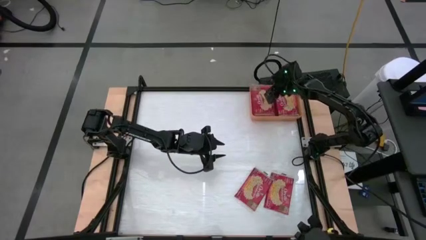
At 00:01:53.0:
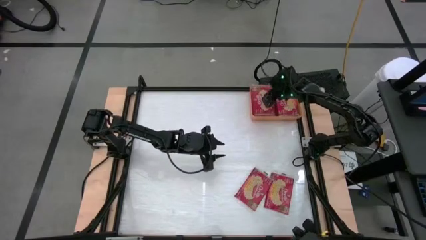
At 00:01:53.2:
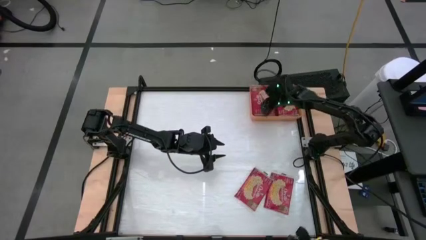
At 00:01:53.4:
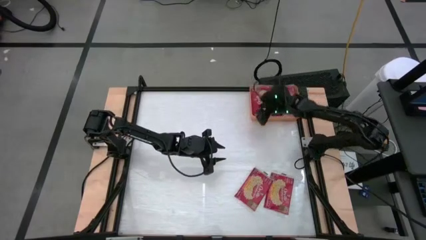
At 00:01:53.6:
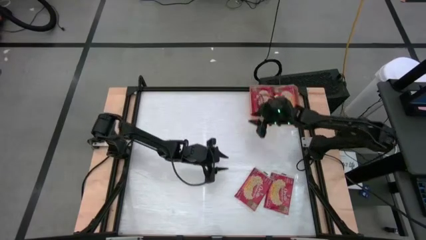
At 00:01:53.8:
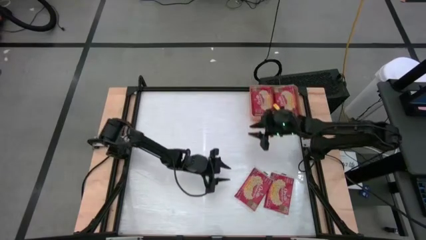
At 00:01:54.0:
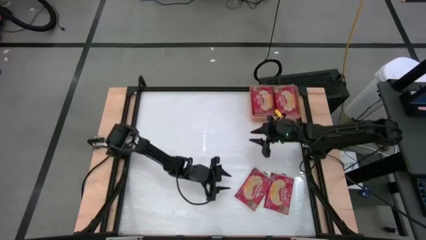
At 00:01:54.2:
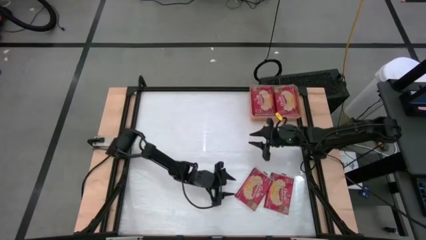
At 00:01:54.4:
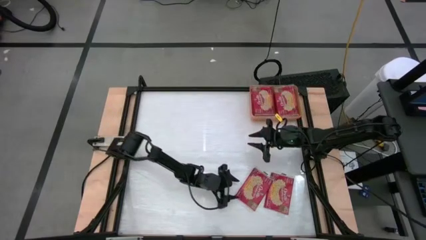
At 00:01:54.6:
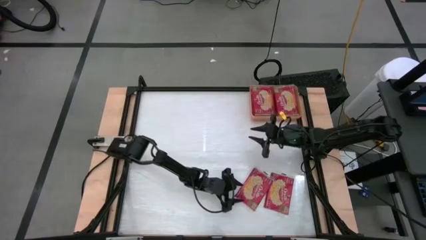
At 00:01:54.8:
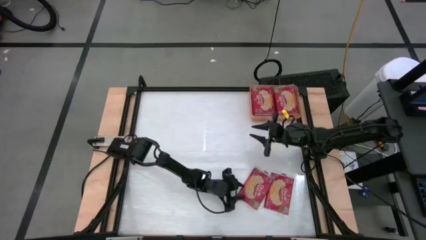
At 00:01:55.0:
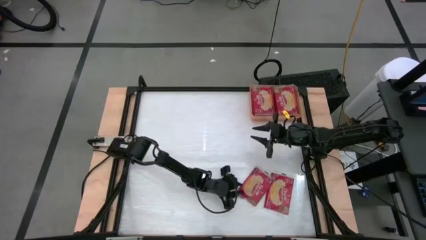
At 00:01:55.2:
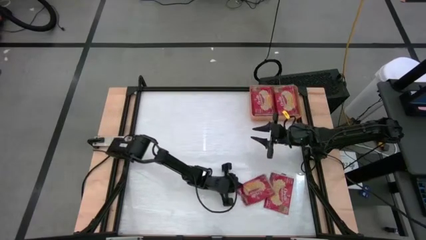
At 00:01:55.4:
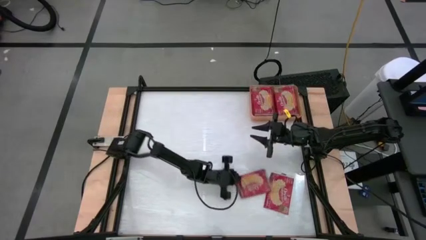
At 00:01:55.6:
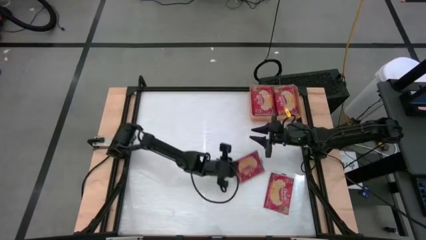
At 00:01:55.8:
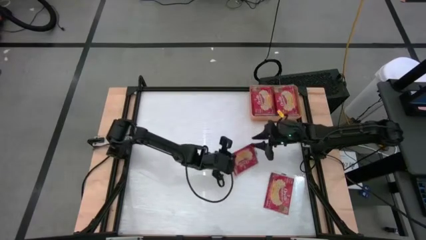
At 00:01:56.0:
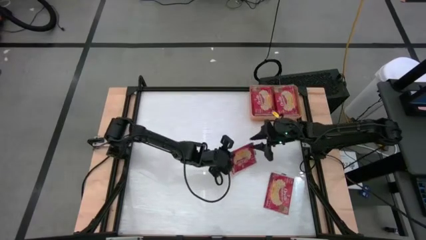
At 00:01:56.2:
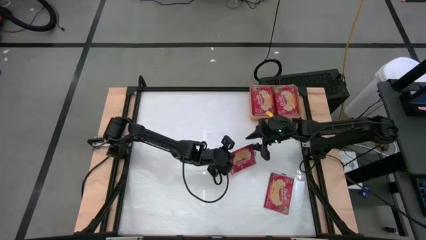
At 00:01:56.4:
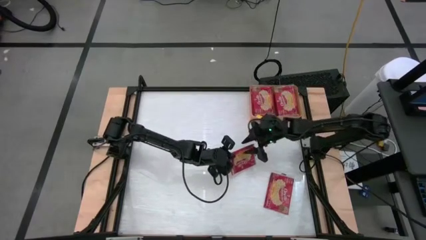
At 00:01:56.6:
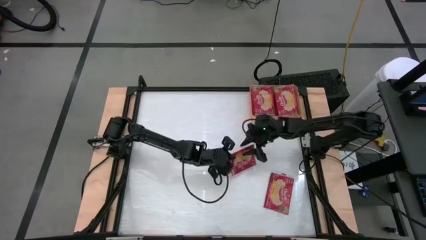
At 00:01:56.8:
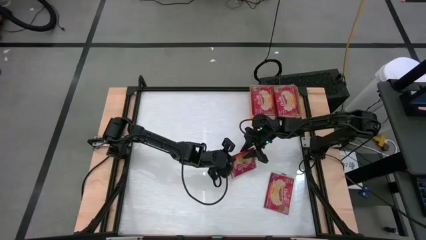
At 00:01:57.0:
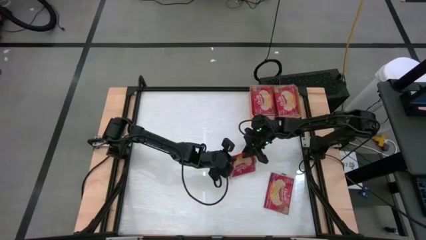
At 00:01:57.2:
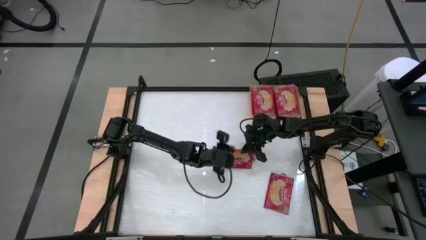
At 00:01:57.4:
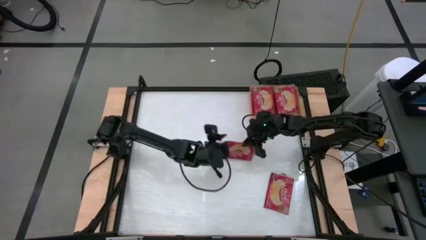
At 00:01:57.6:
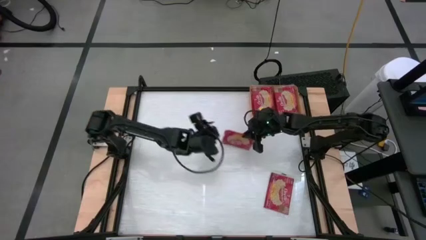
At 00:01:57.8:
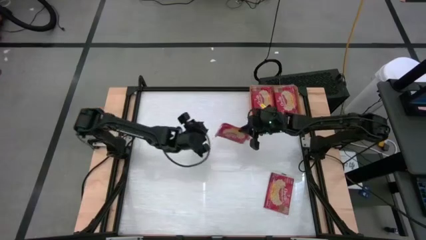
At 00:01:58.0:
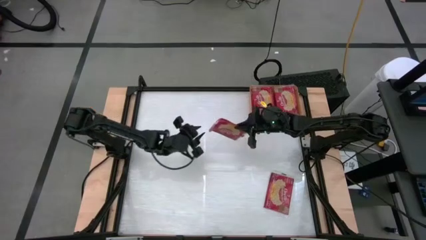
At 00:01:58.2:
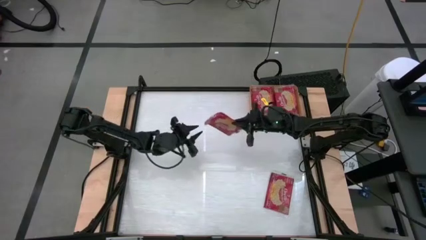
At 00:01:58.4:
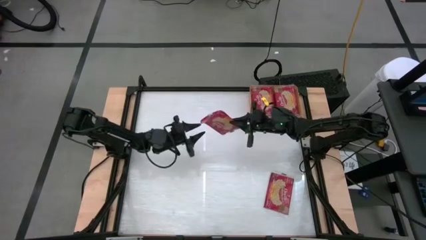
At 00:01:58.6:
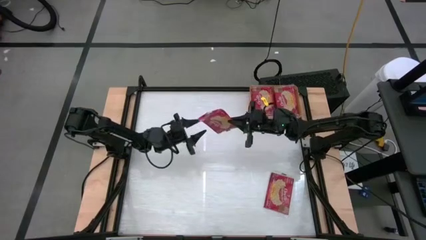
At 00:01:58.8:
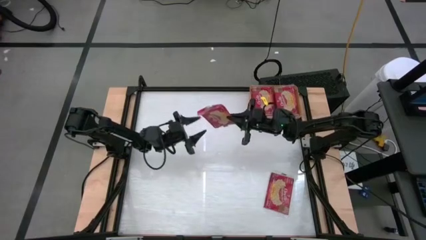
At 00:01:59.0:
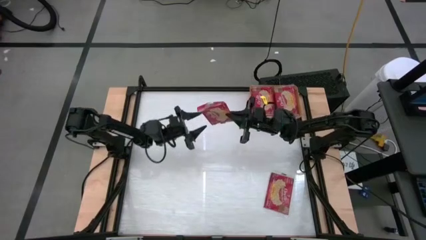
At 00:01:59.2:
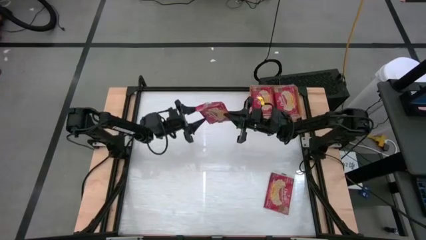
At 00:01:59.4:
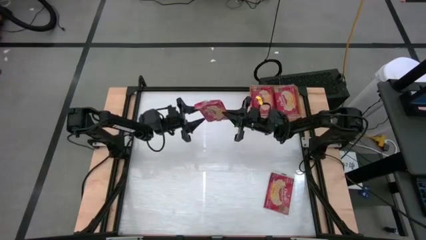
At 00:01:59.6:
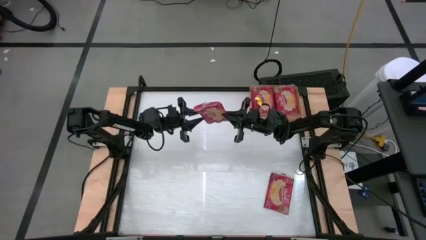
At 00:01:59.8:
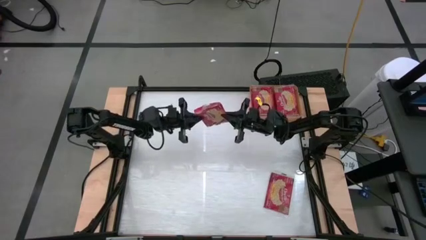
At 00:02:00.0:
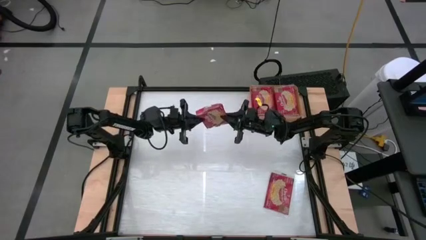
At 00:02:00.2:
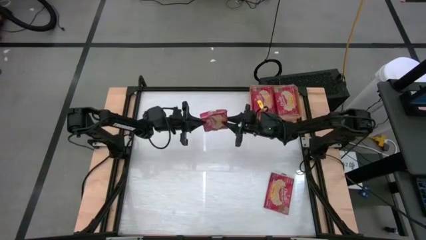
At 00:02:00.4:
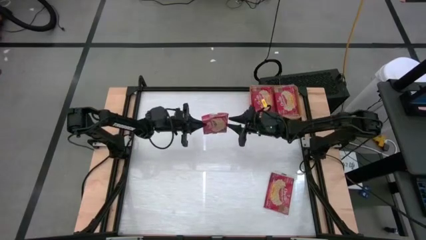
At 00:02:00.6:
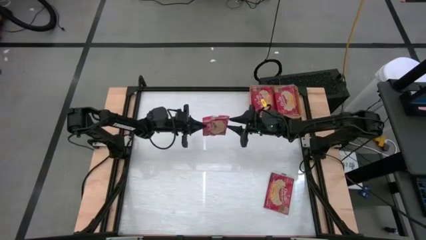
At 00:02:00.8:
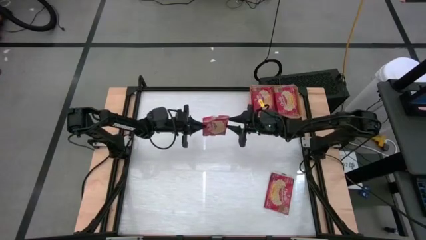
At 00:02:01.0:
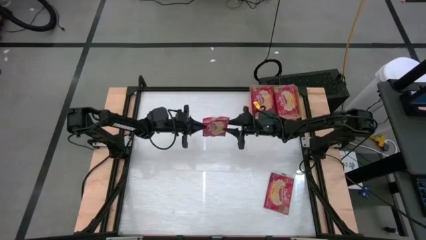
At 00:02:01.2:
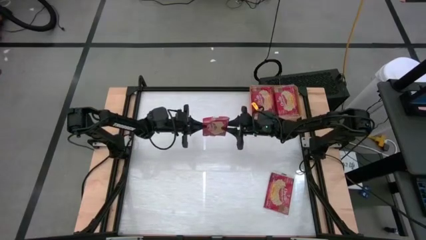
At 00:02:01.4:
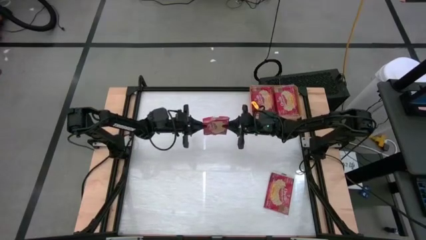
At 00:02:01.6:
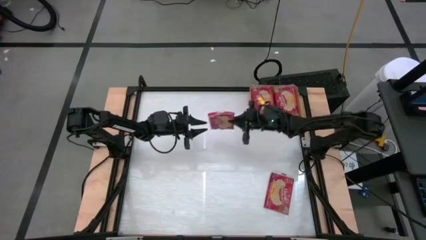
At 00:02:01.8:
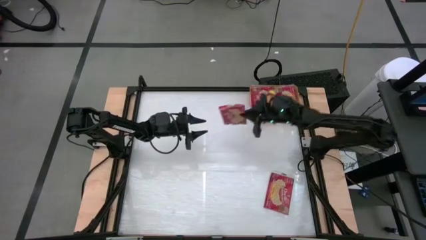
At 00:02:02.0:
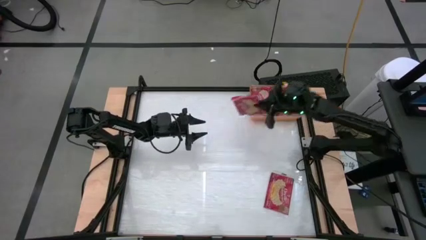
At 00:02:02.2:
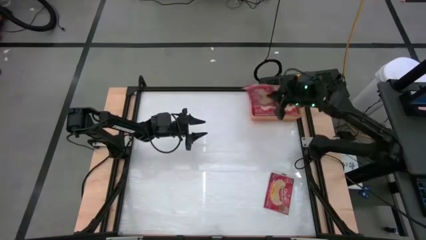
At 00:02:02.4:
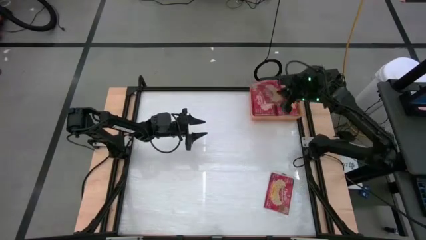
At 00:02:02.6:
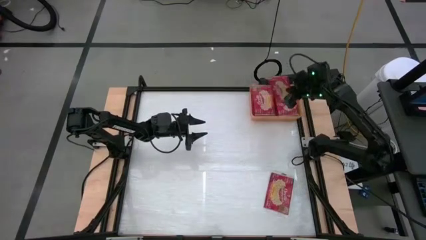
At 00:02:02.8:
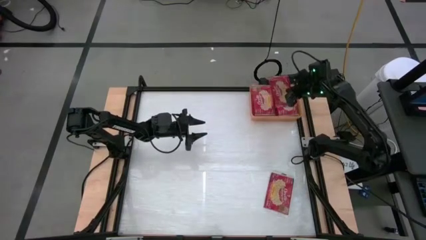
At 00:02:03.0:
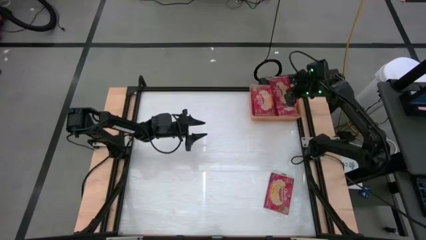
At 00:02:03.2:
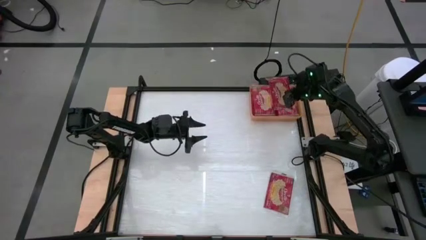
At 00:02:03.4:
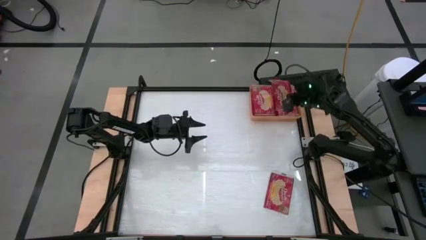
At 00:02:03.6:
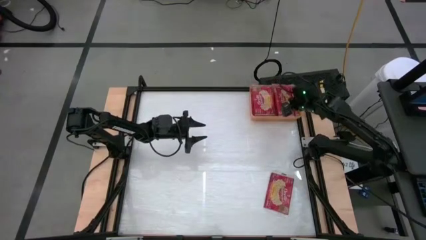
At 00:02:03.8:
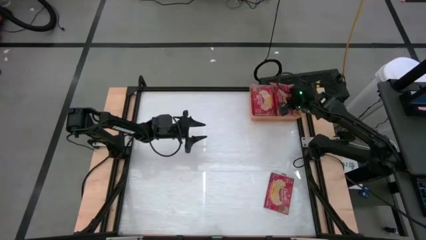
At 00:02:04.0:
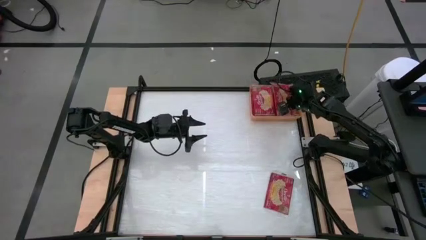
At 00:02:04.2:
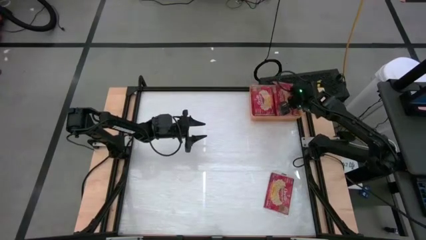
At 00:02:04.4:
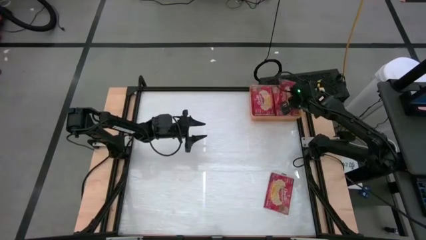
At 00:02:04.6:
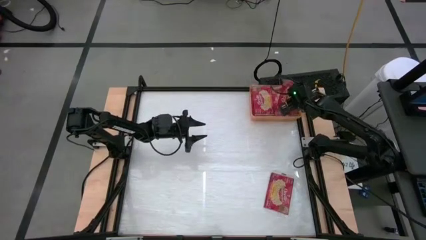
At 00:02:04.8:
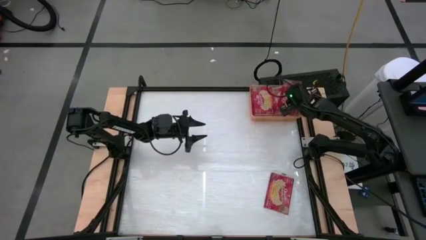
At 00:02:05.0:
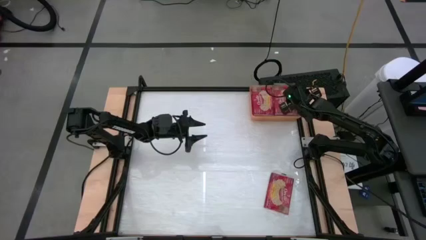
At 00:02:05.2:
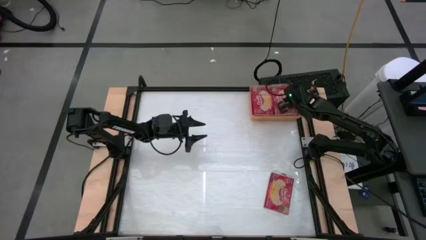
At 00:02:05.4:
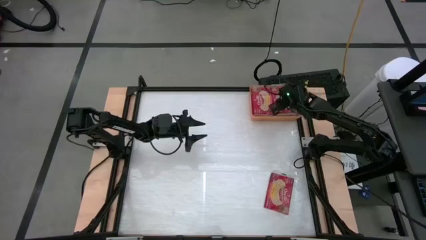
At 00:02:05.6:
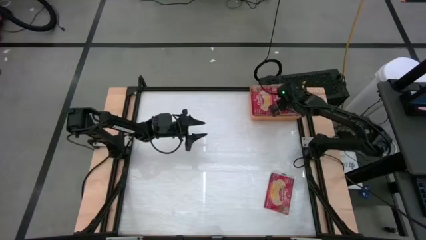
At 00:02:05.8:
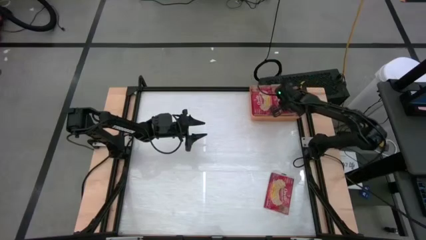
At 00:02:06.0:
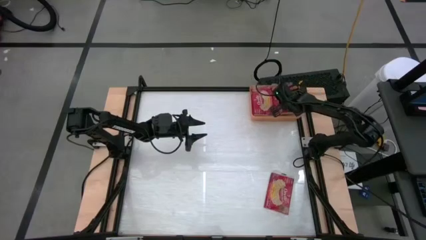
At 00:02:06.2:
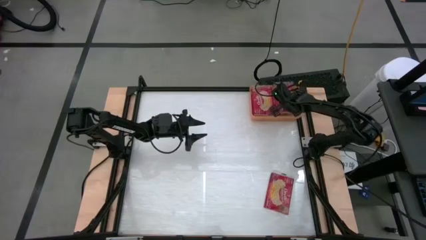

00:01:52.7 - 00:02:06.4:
Task: Sort popcorn bags into baskets
Put the red popcorn bag into the orange bin
